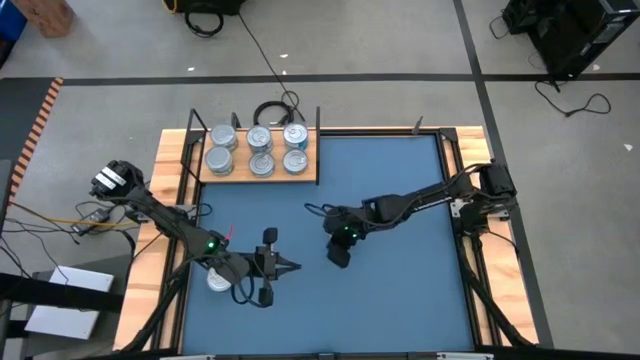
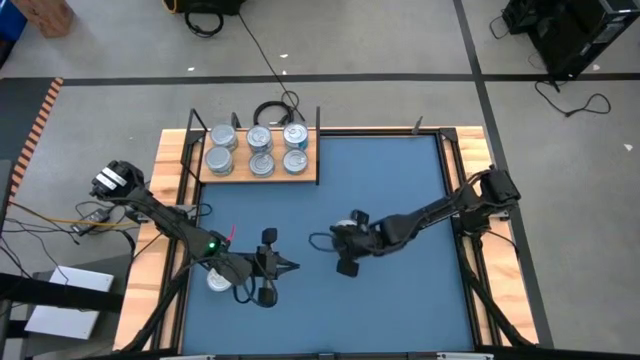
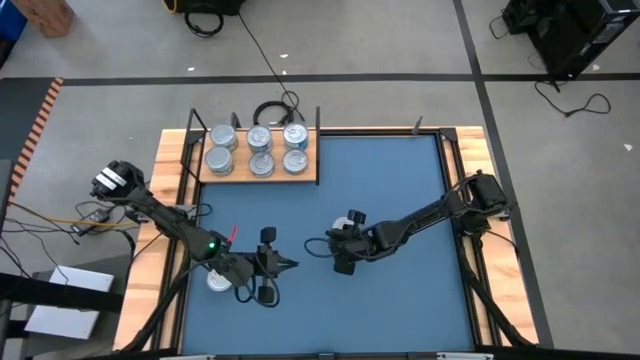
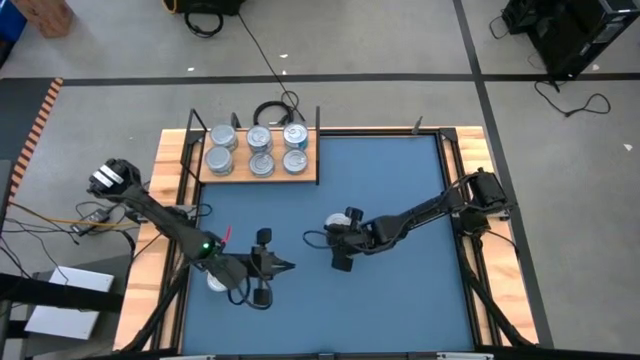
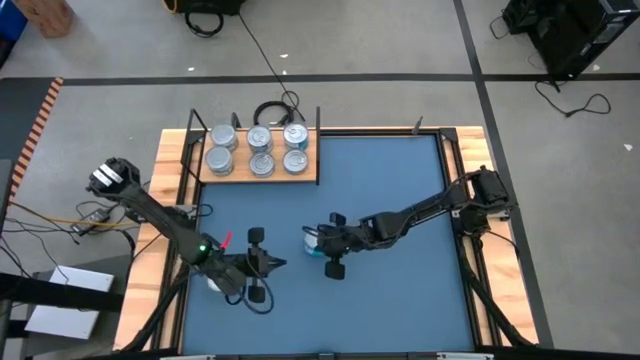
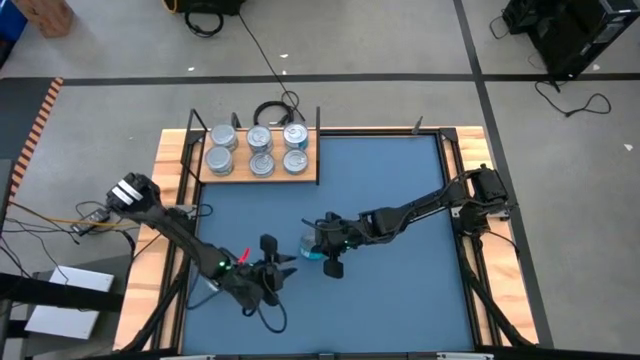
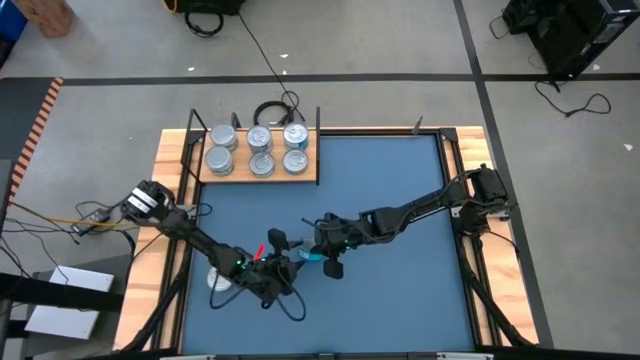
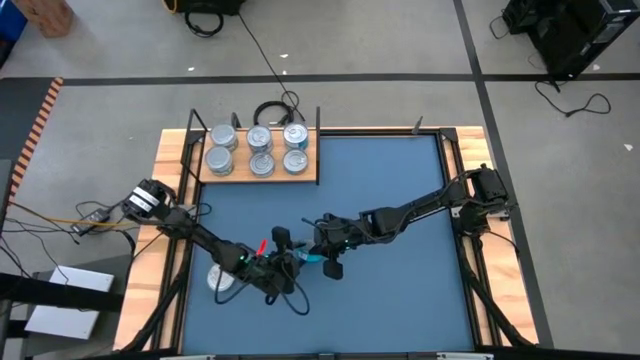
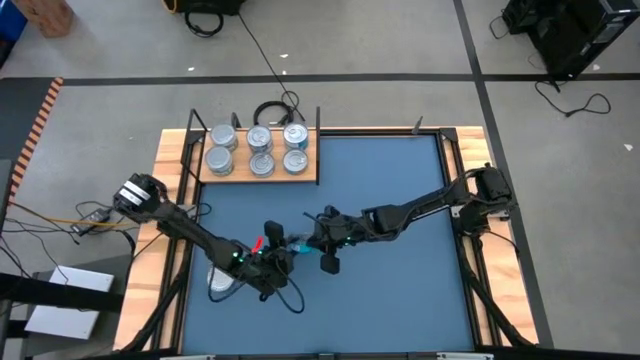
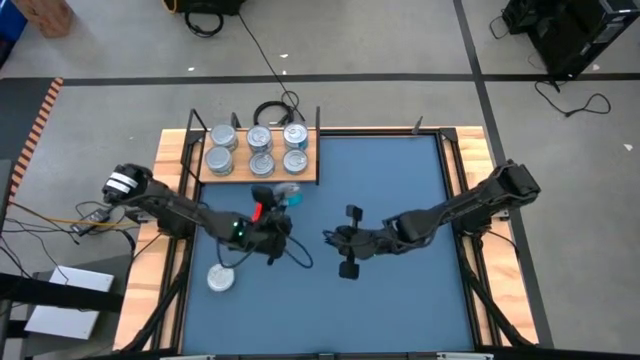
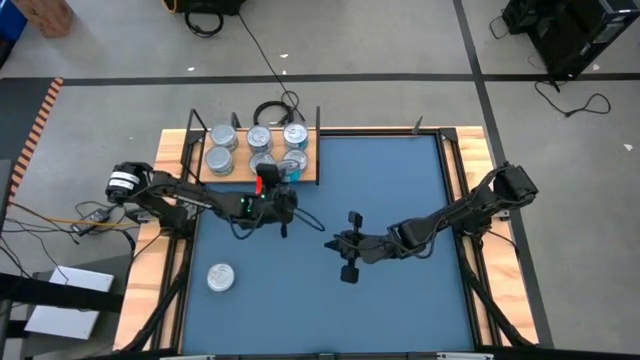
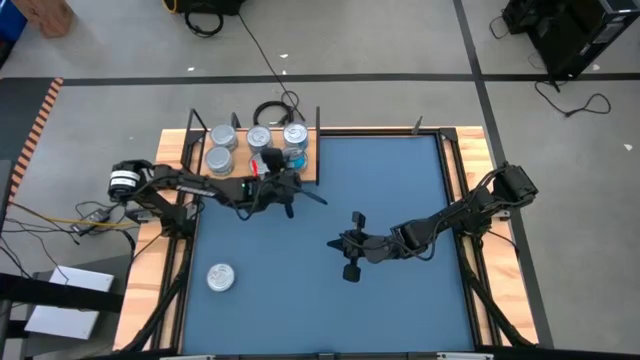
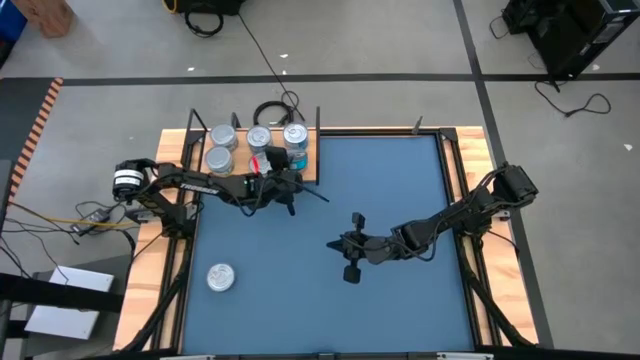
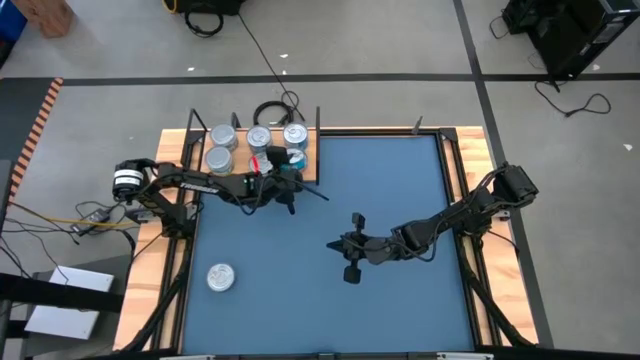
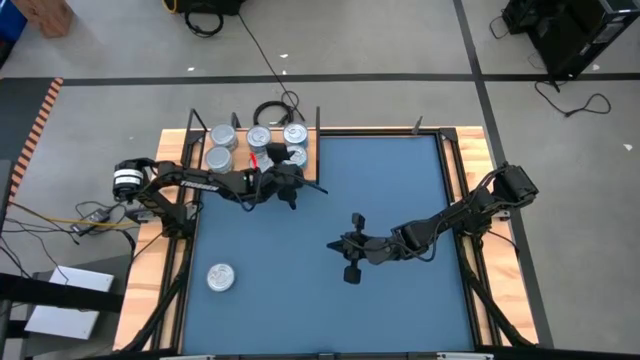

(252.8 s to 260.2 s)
Task: Stack canned seafood by type on shelf
Stack the yellow blue tuna can on top of the yellow blue tuna can on the shelf

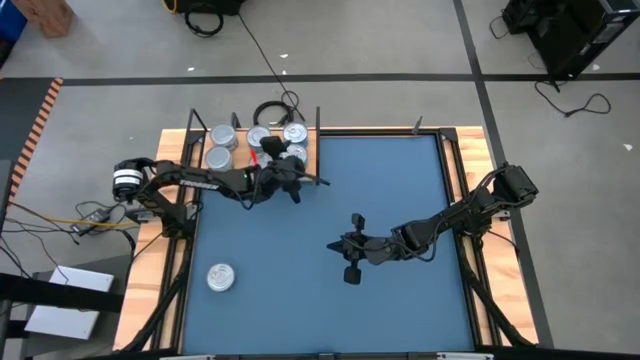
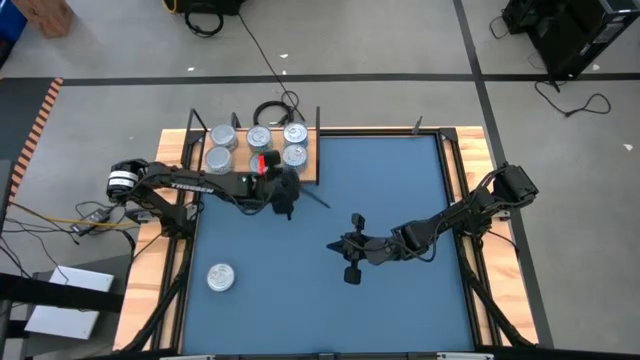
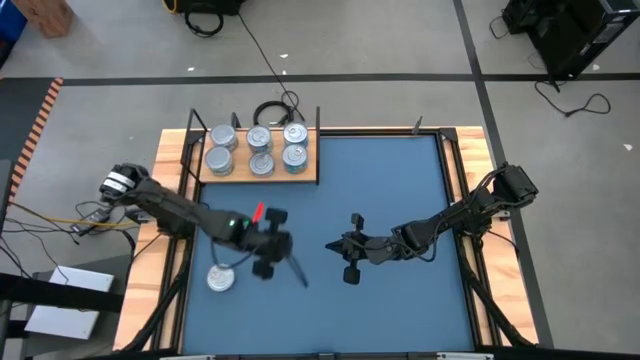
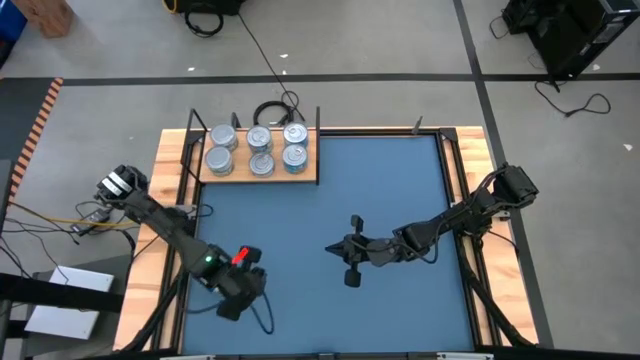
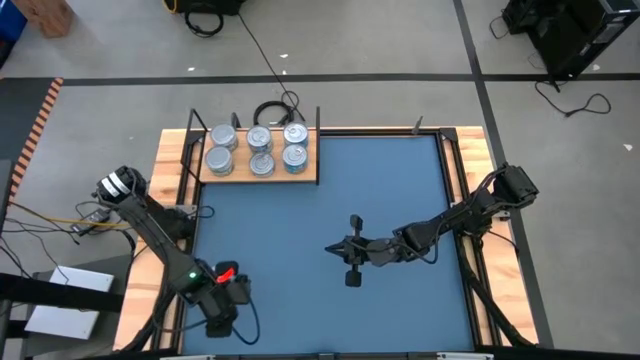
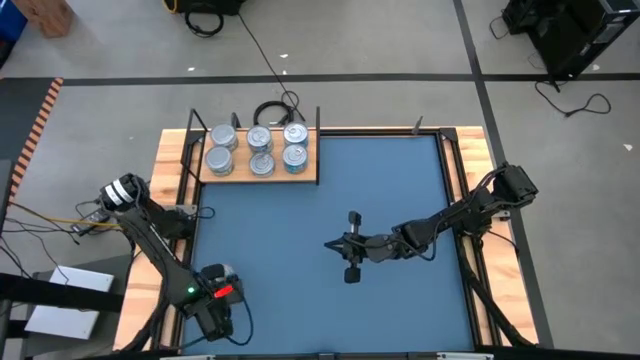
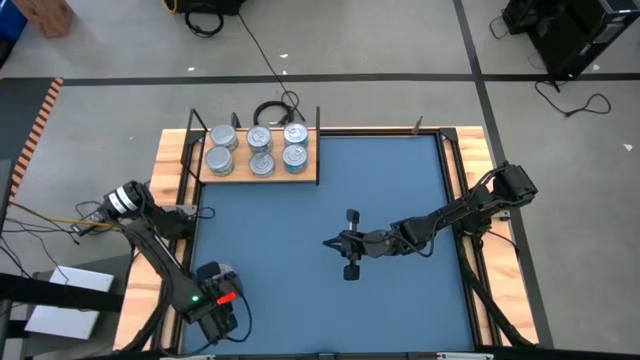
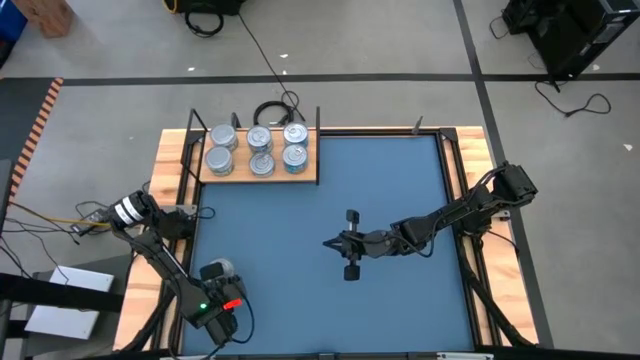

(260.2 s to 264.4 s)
Stack the blue tuna can on top of the blue tuna can on the shelf

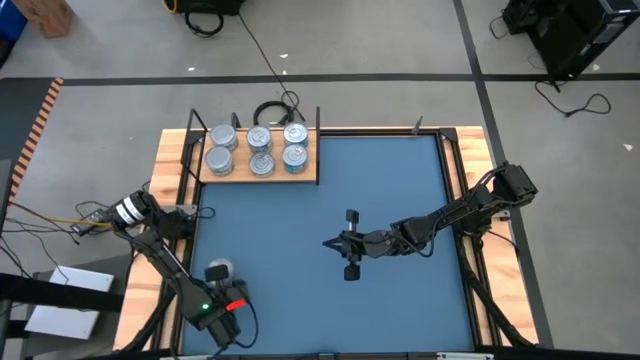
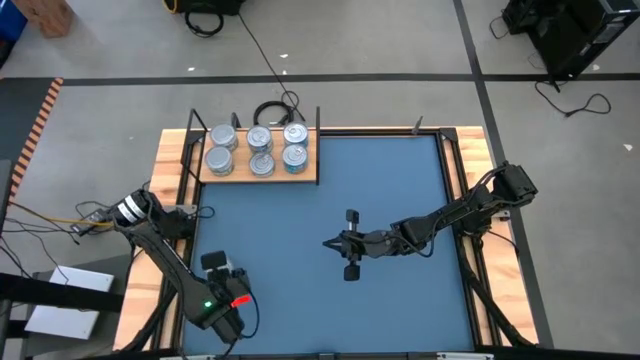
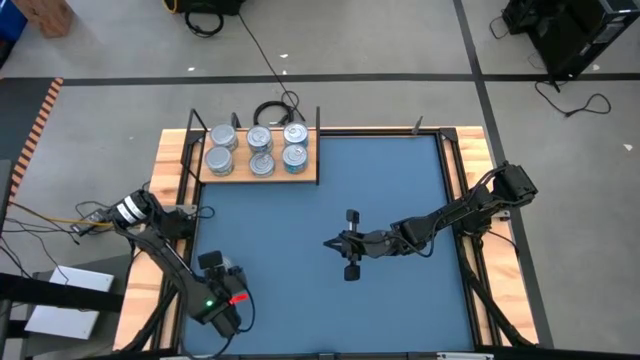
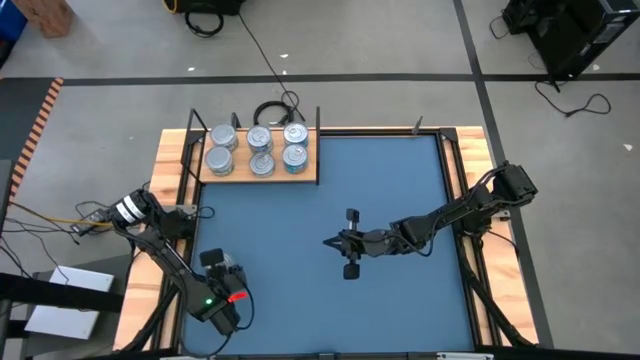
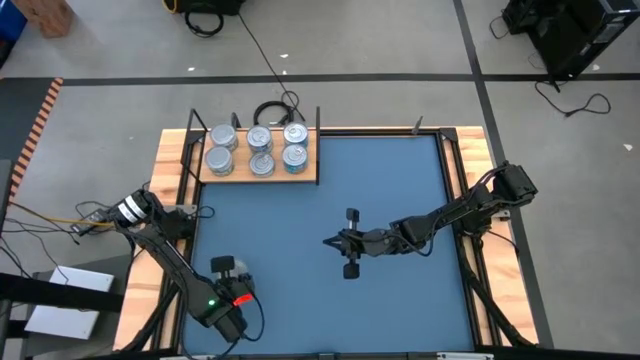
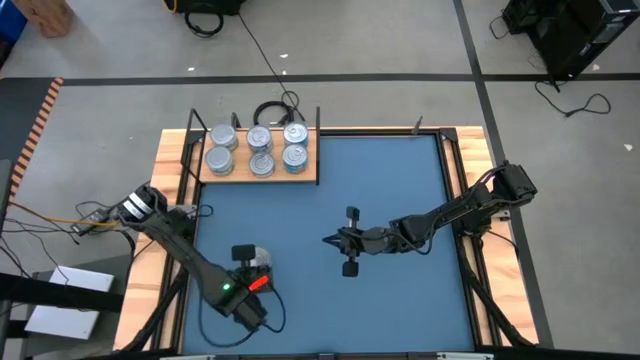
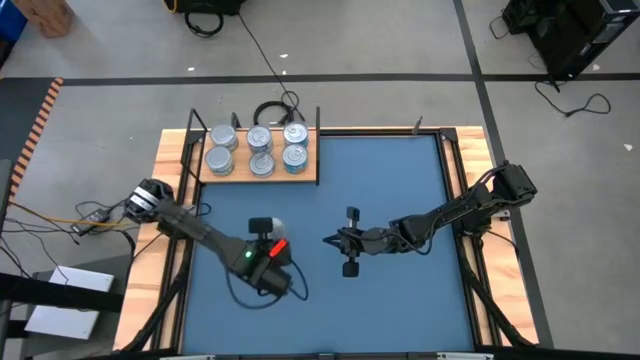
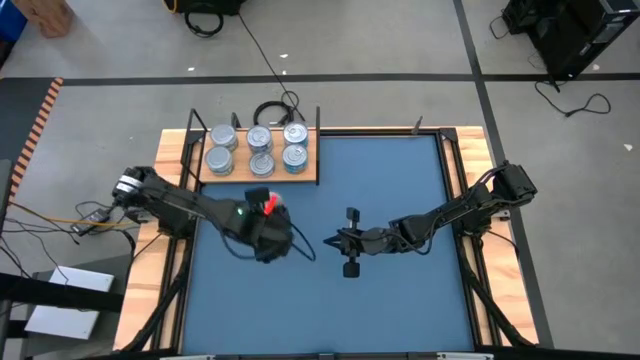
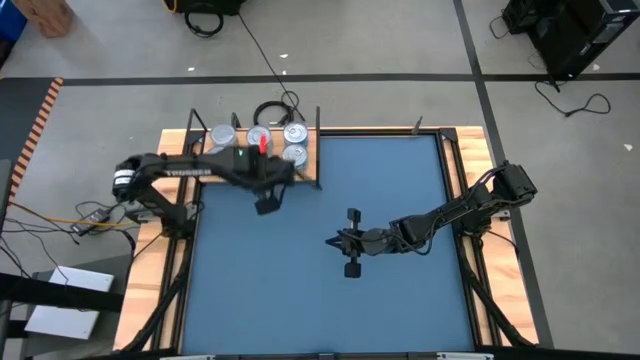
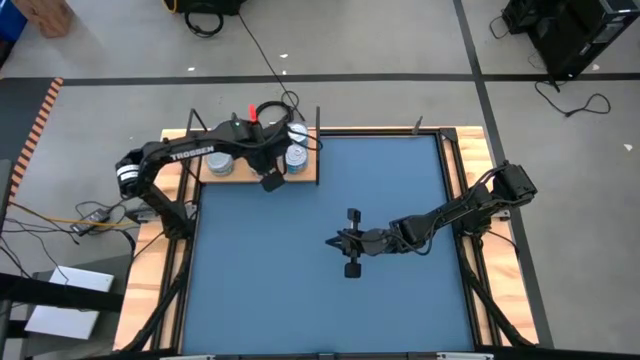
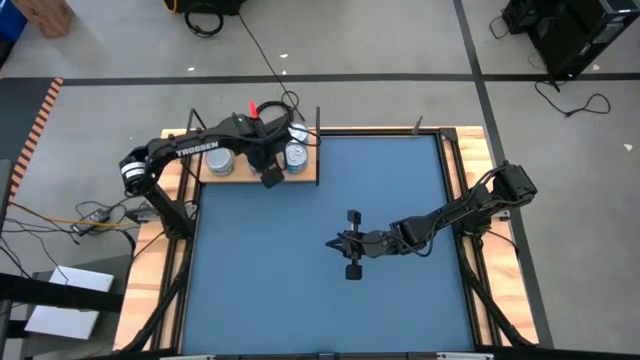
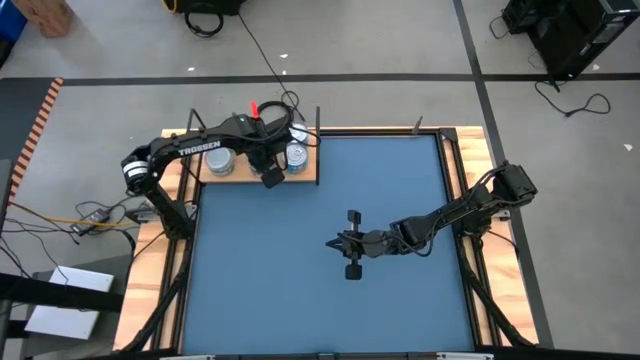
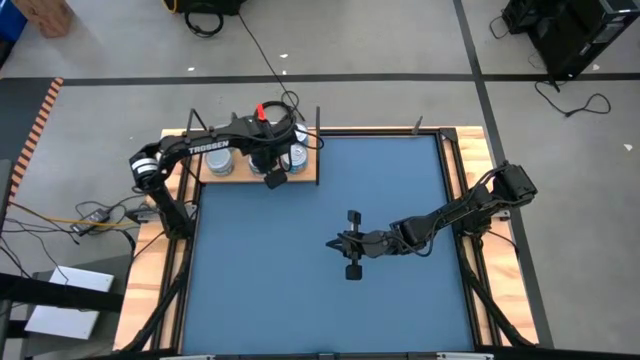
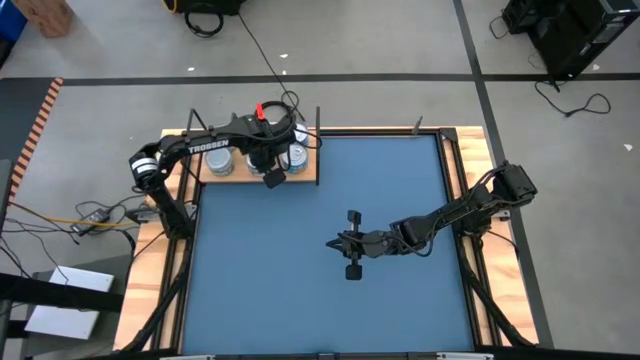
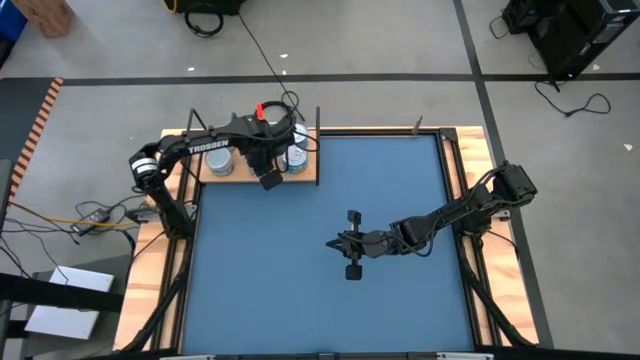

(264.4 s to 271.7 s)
Stack the blue tuna can on top of the blue tuna can on the shelf
